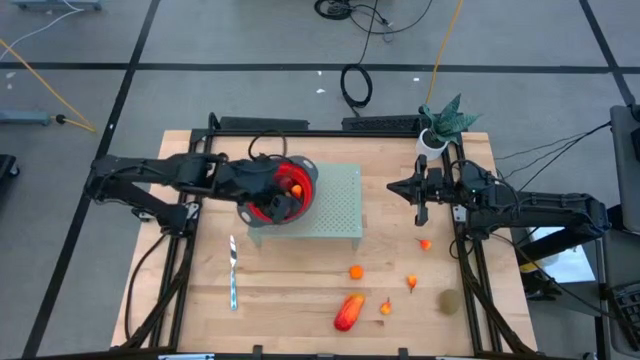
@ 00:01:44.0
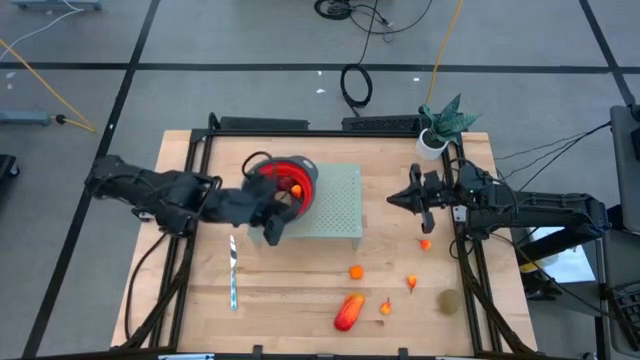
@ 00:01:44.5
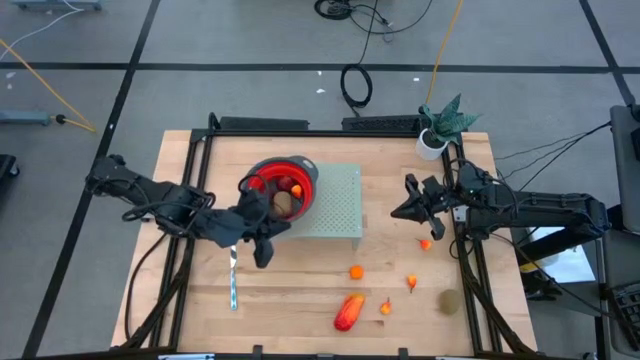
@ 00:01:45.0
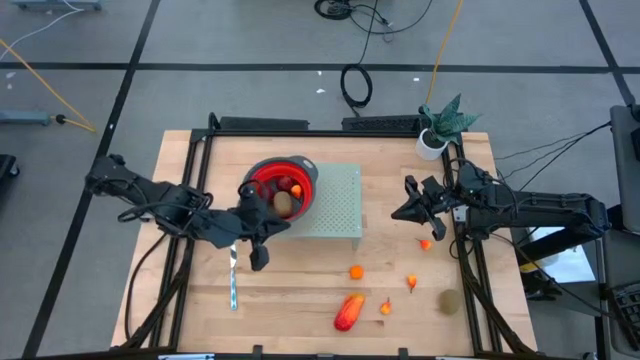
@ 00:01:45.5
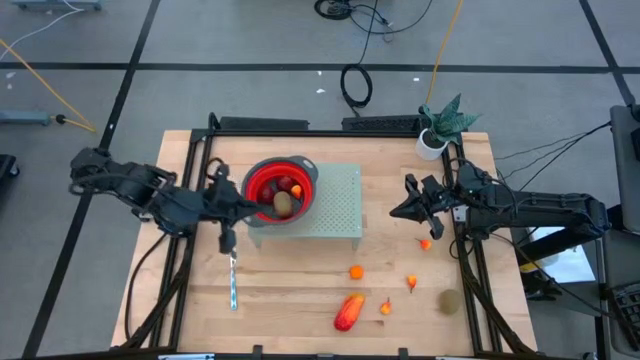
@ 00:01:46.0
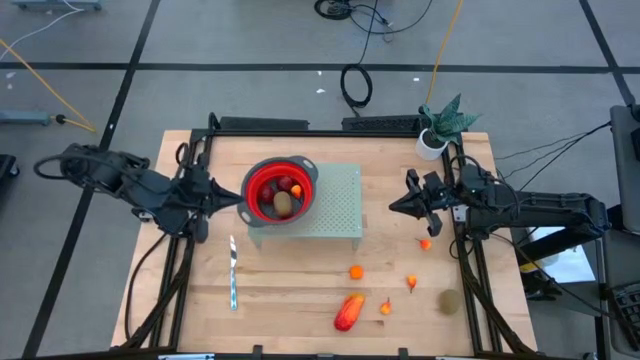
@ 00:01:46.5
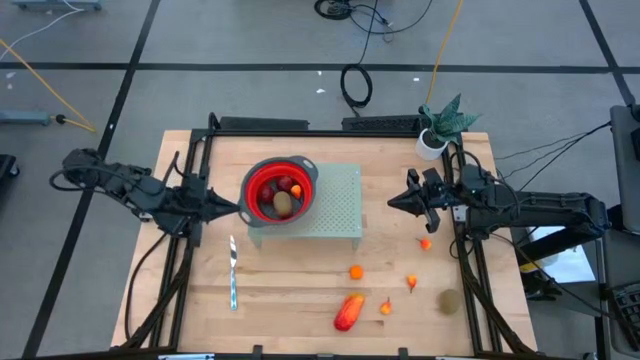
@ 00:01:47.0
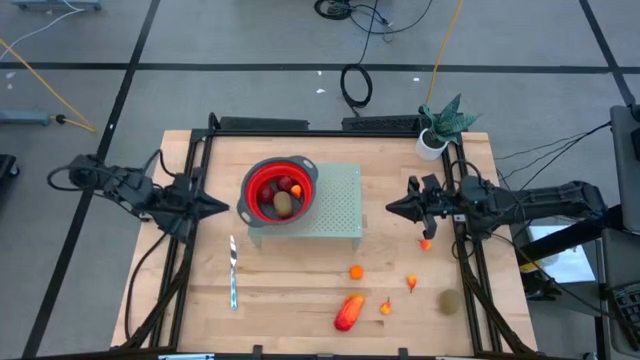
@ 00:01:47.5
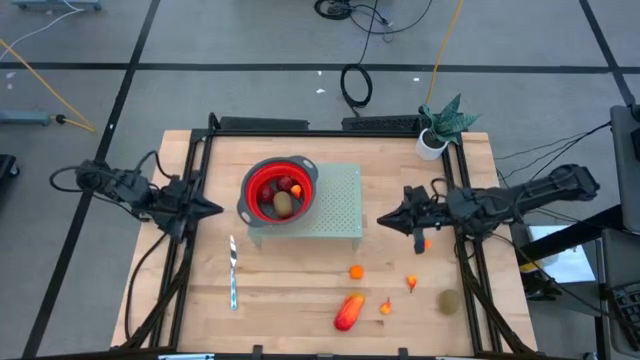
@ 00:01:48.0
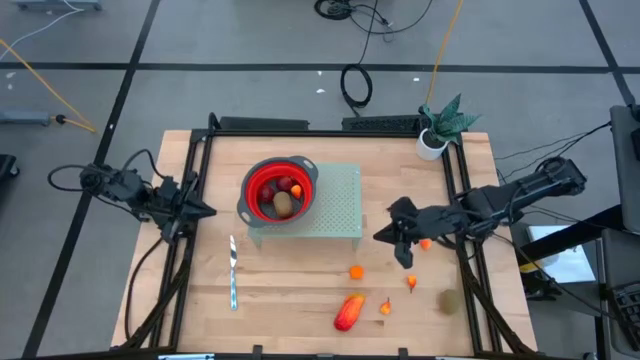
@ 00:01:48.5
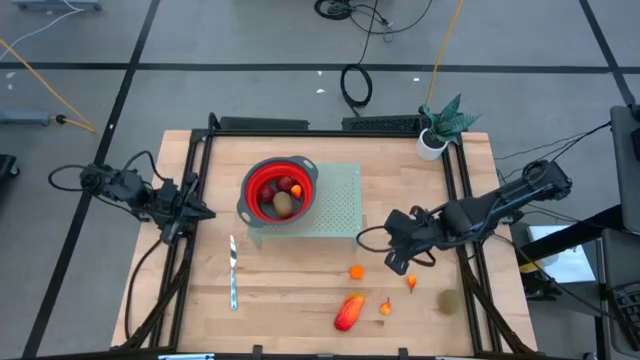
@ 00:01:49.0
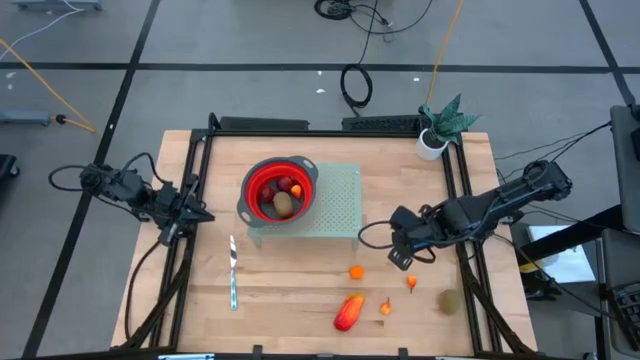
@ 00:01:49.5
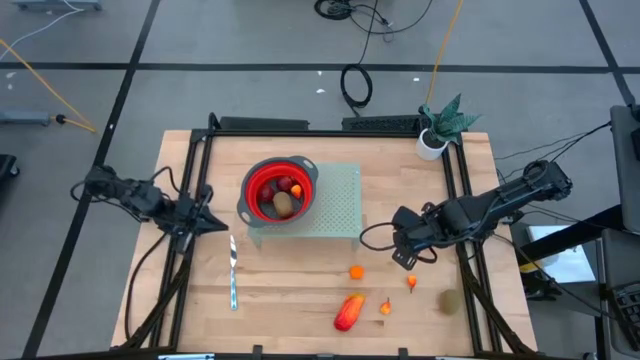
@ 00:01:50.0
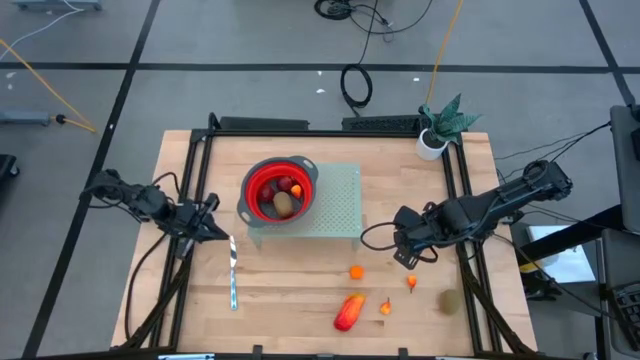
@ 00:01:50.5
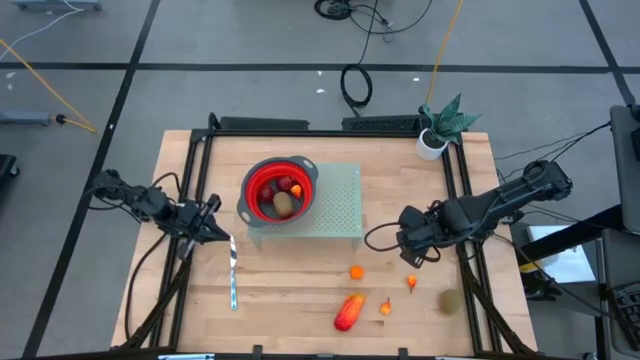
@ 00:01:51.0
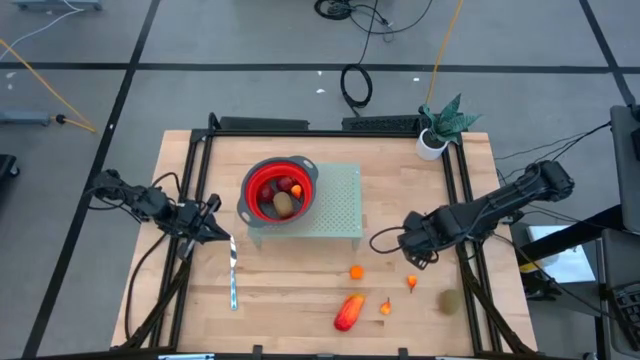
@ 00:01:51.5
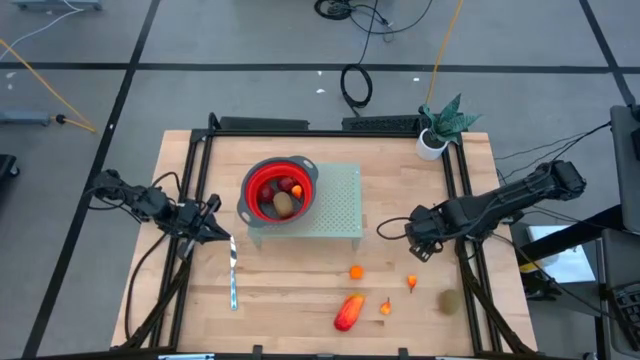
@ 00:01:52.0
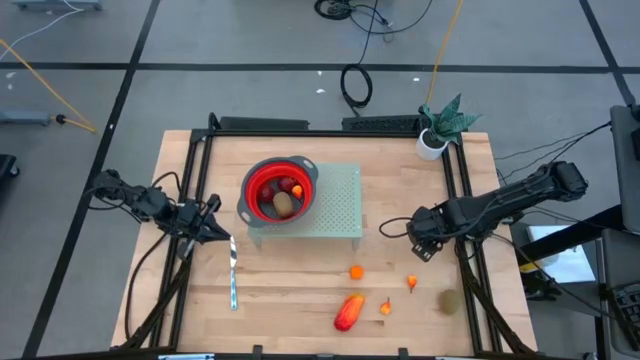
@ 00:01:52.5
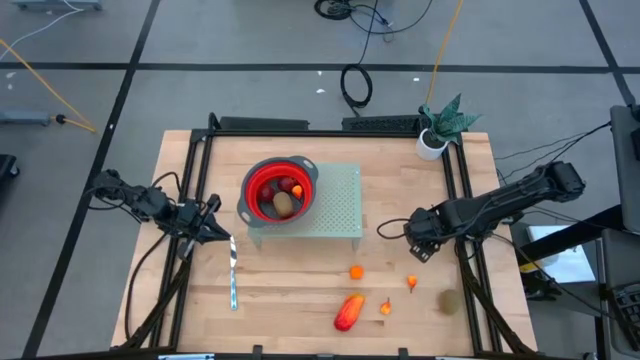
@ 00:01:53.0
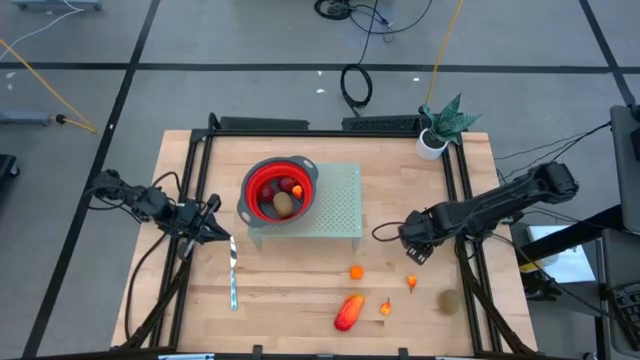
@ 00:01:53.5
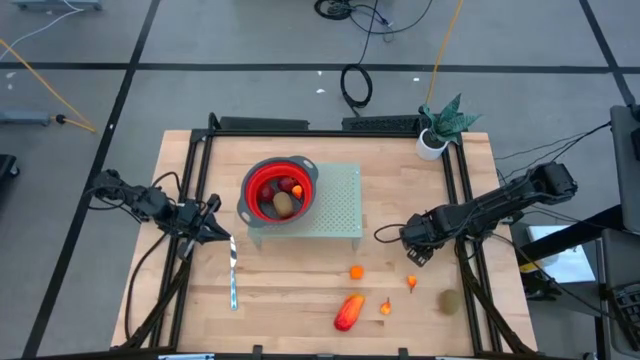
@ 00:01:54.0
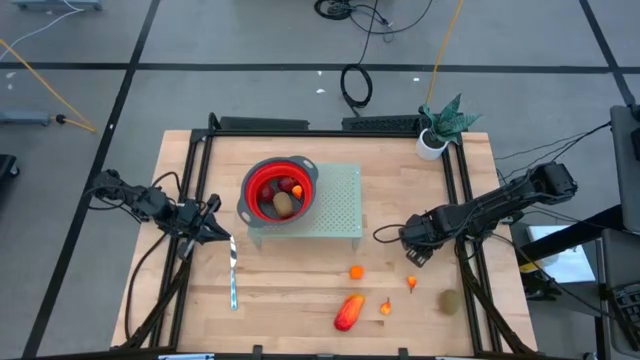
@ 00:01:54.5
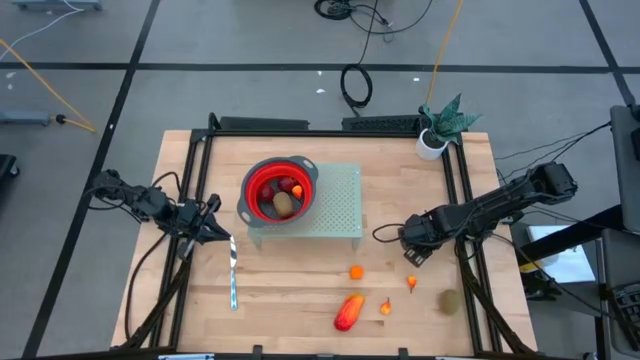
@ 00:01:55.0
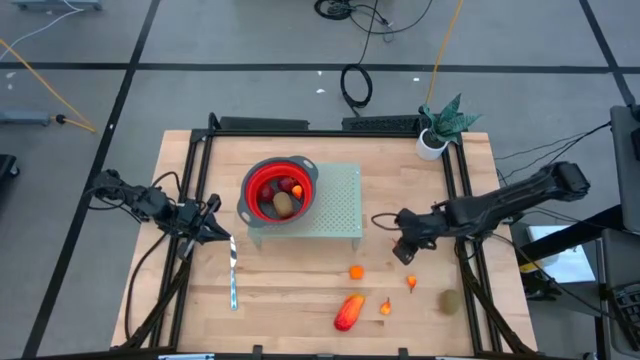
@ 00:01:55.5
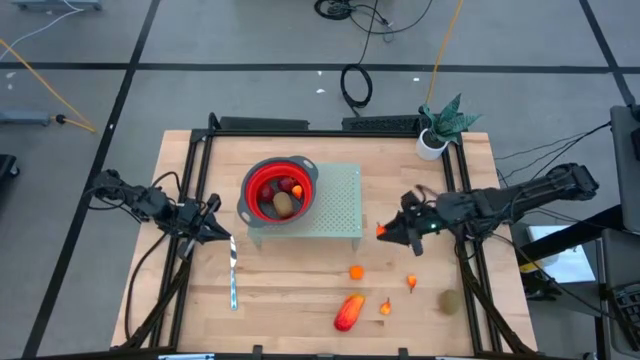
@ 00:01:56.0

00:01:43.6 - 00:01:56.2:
Task: Pick & Place Fruit
Put the top peach into the strainer bowl on the shelf

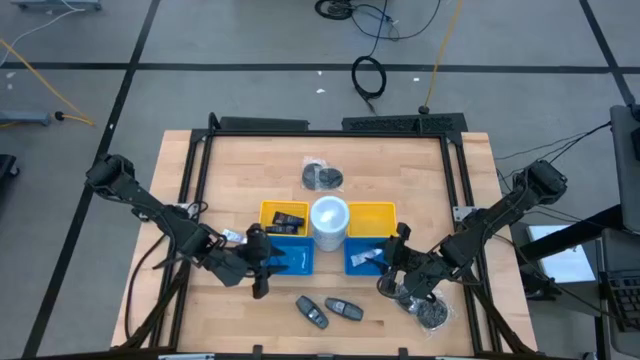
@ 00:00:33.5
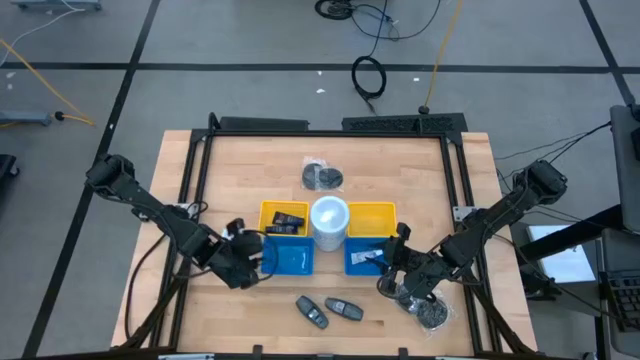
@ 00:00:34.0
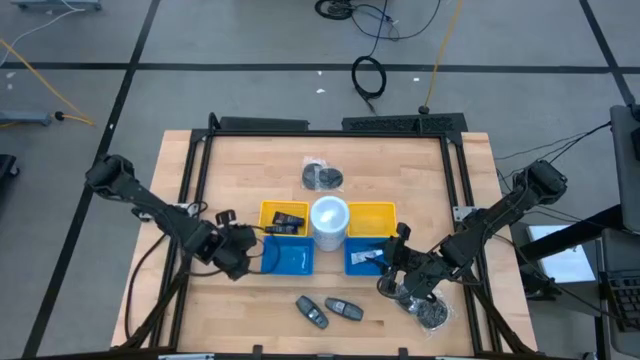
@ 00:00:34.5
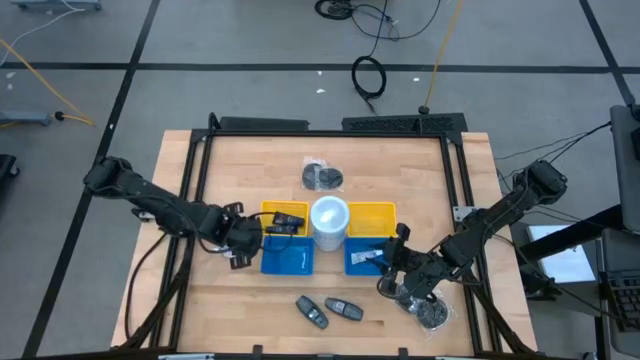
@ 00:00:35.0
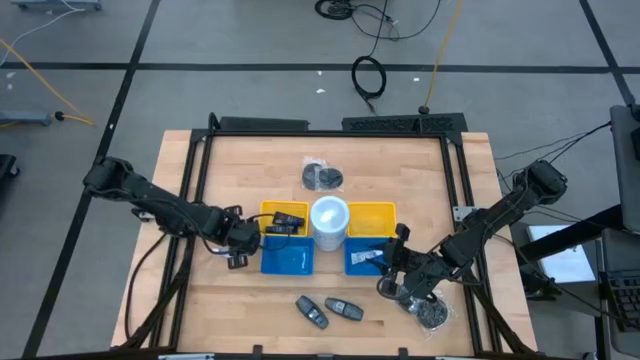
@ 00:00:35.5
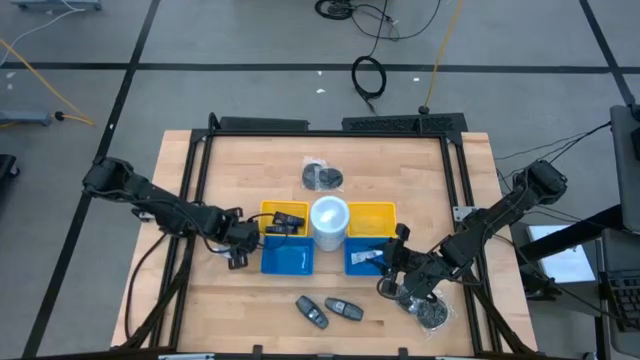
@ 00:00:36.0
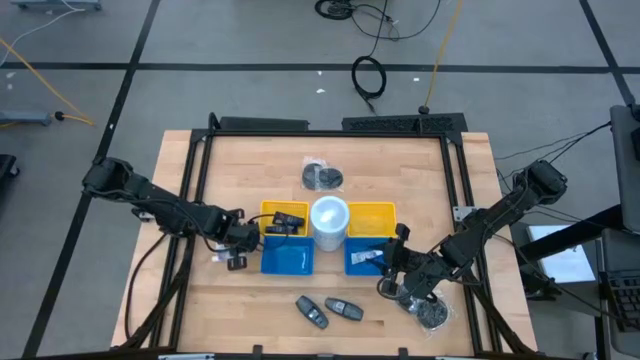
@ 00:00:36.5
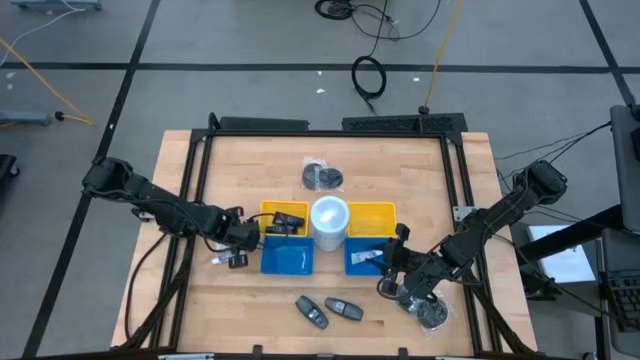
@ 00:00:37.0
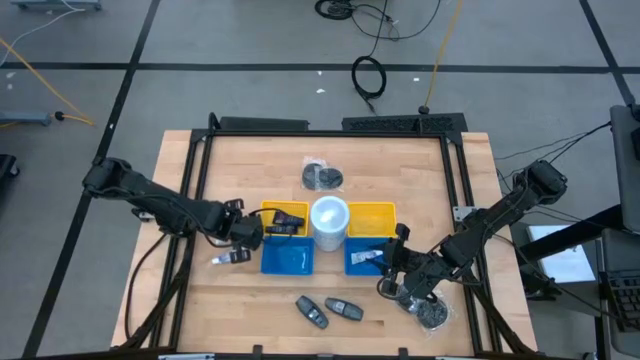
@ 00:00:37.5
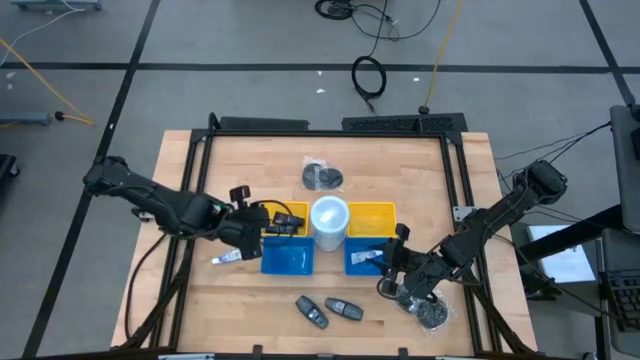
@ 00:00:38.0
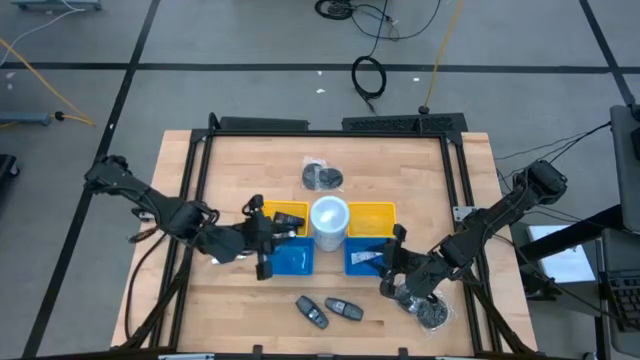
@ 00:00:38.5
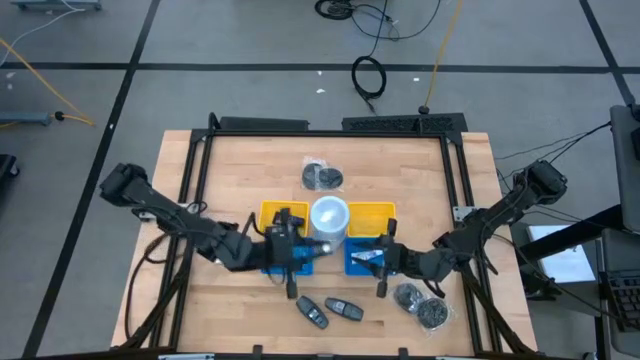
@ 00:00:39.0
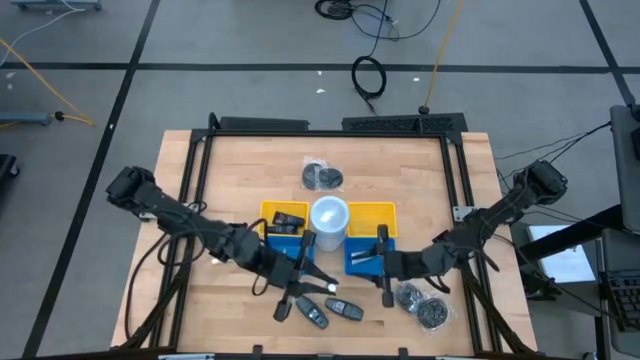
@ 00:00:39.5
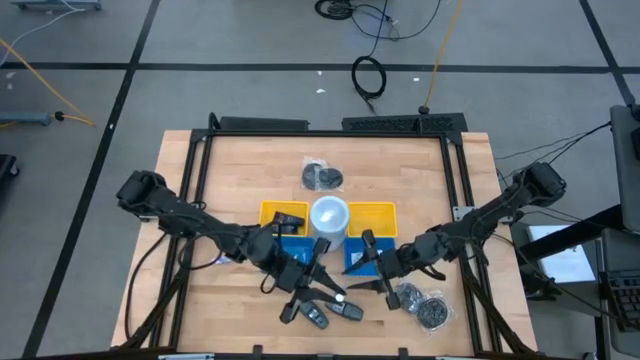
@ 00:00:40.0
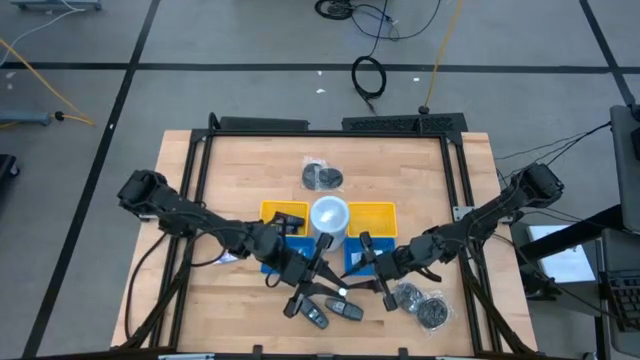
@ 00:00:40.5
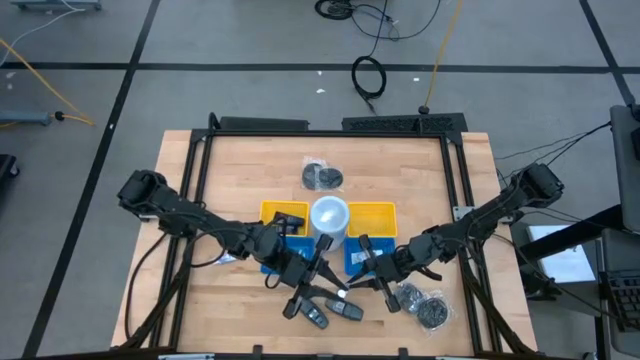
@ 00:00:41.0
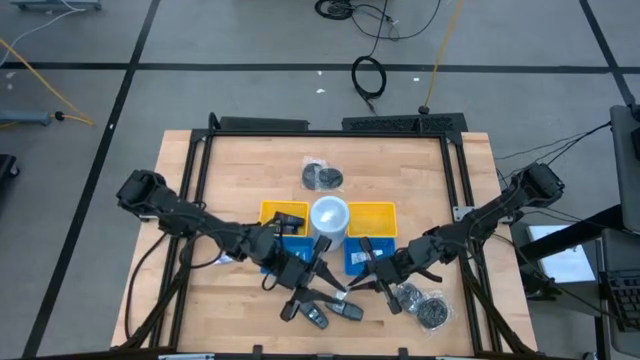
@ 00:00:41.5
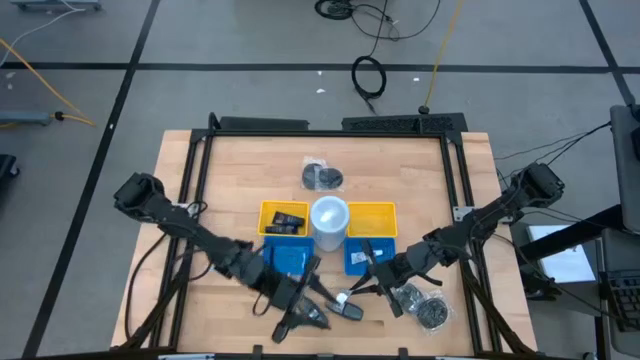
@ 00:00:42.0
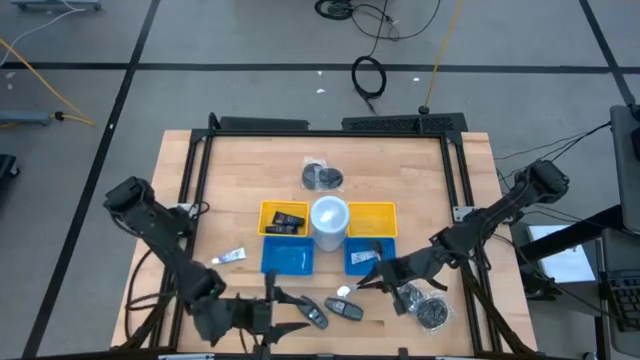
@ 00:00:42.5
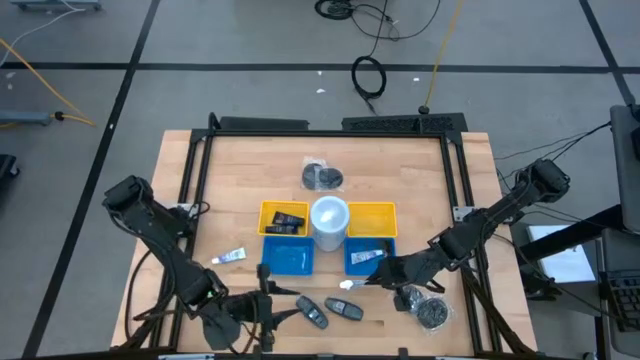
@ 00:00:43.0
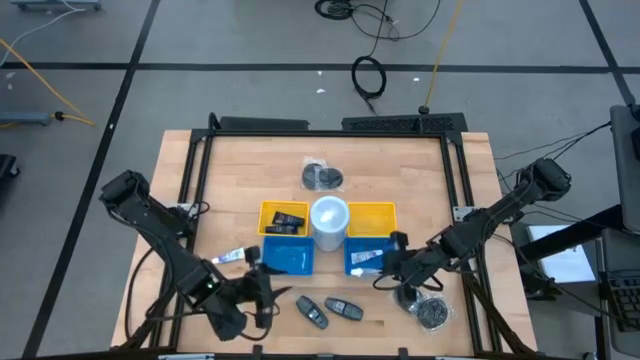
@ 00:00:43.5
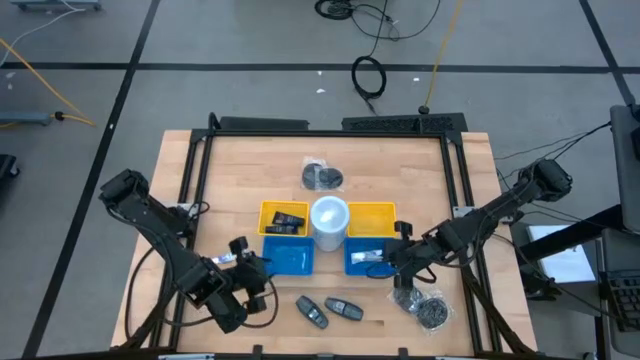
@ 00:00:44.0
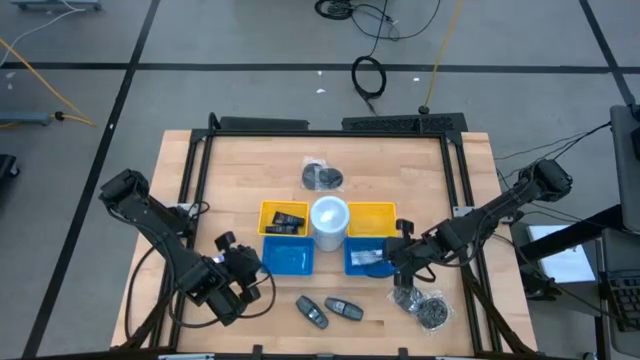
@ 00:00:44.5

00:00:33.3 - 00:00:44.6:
Task: Pick & Place Travel size toiletries
Put the toothpaste into the right blue bin
